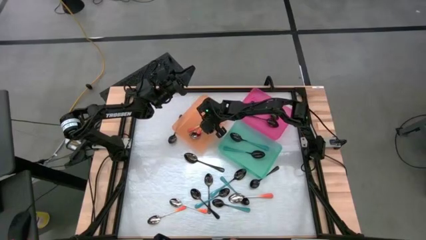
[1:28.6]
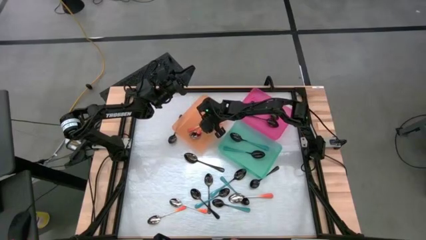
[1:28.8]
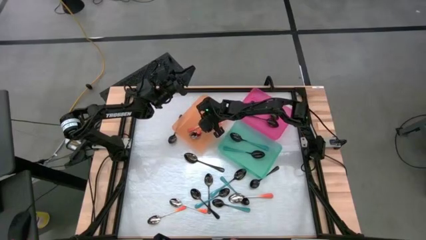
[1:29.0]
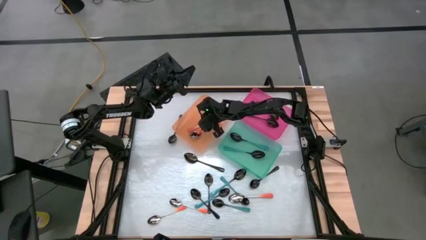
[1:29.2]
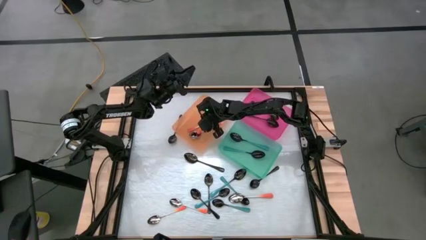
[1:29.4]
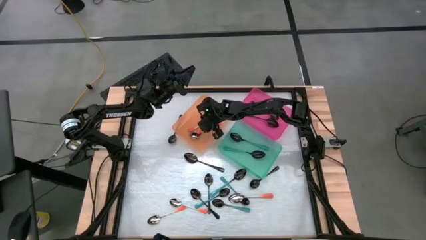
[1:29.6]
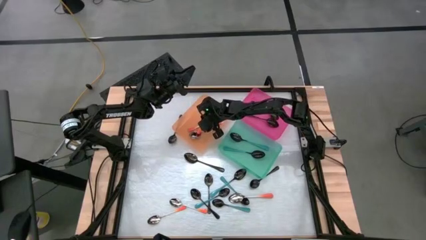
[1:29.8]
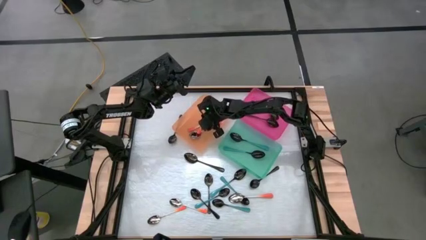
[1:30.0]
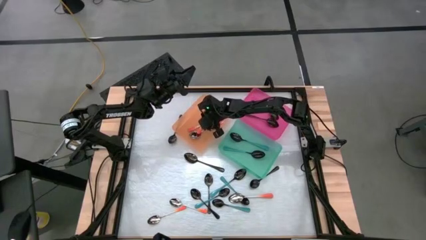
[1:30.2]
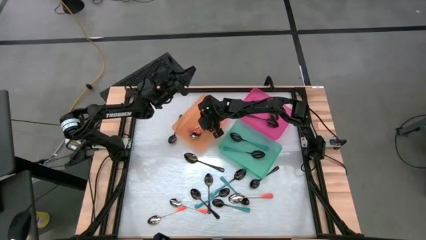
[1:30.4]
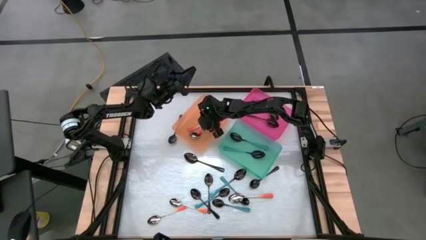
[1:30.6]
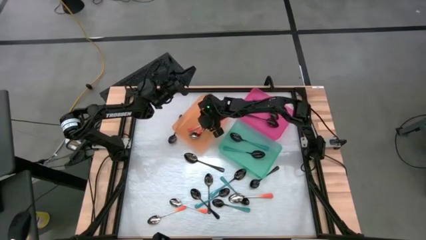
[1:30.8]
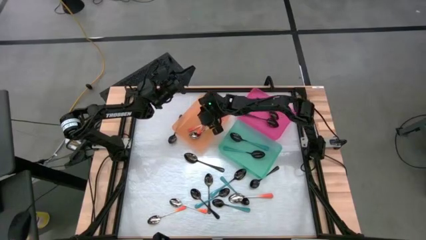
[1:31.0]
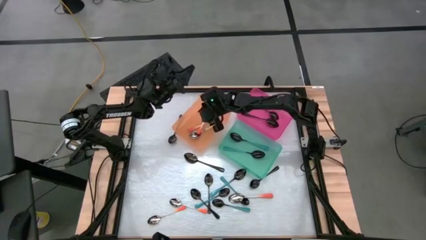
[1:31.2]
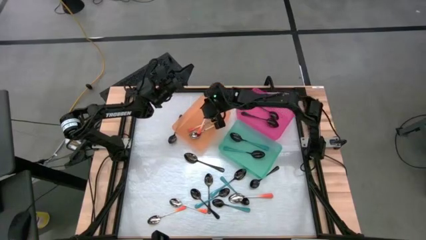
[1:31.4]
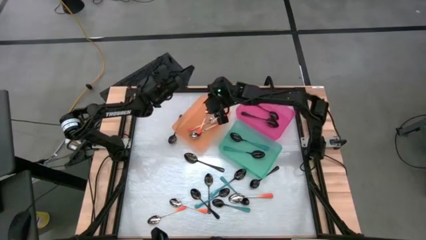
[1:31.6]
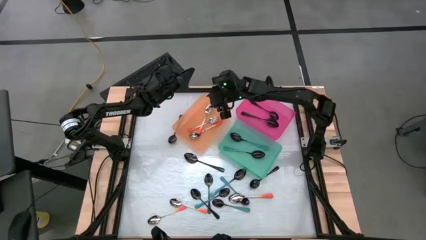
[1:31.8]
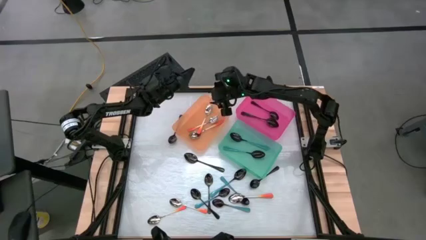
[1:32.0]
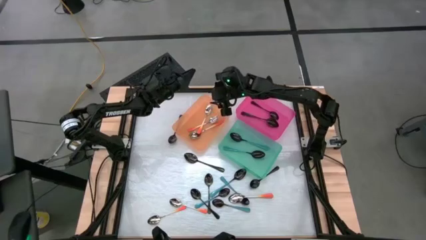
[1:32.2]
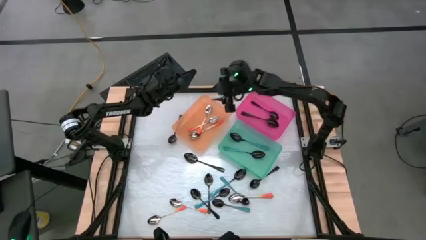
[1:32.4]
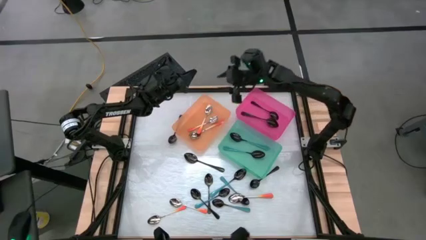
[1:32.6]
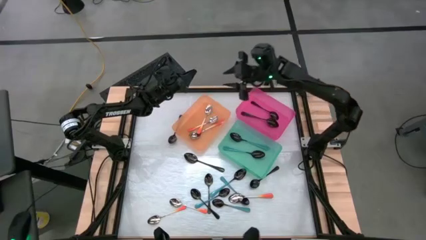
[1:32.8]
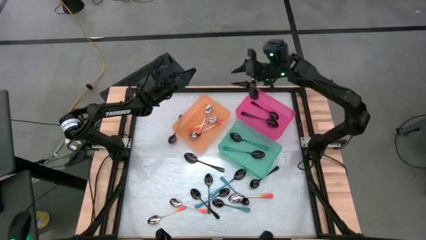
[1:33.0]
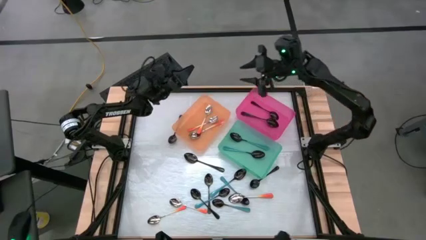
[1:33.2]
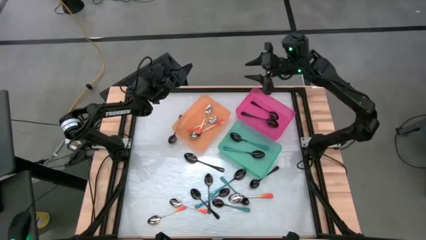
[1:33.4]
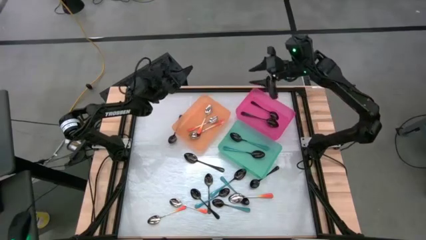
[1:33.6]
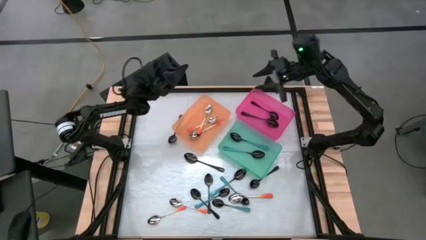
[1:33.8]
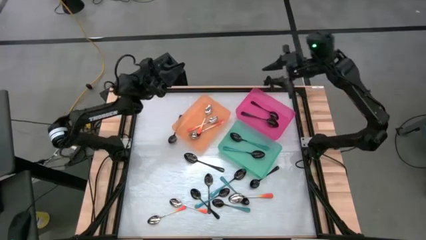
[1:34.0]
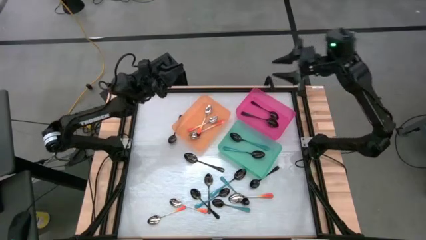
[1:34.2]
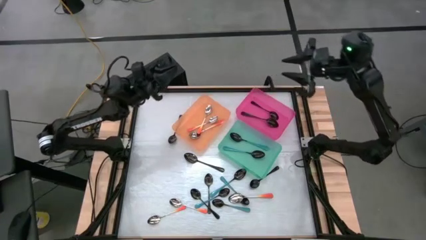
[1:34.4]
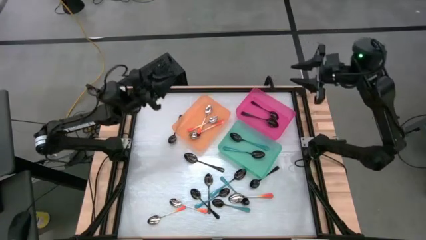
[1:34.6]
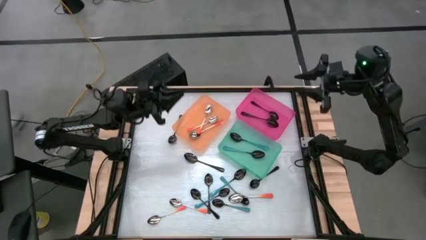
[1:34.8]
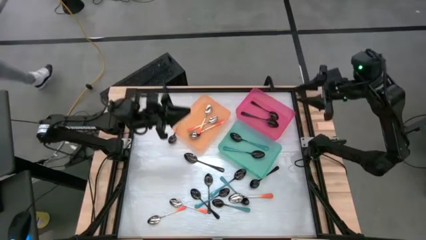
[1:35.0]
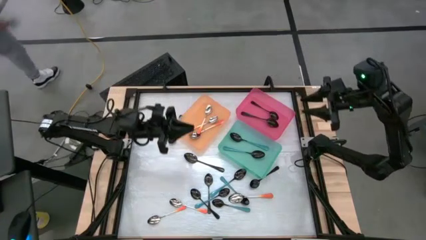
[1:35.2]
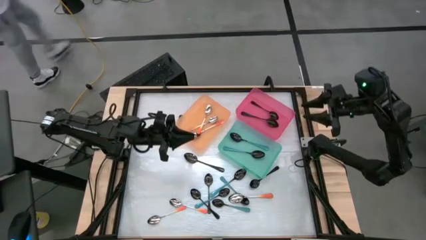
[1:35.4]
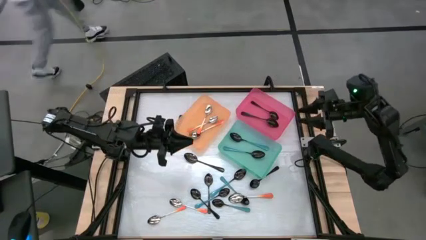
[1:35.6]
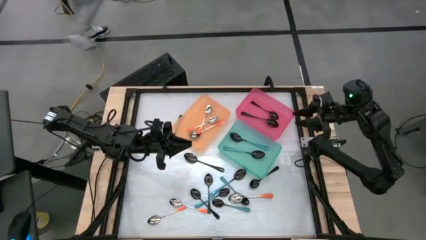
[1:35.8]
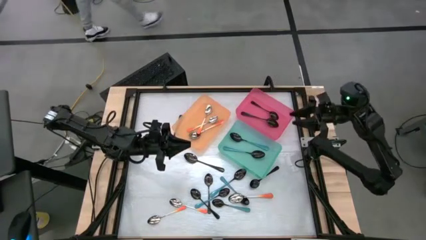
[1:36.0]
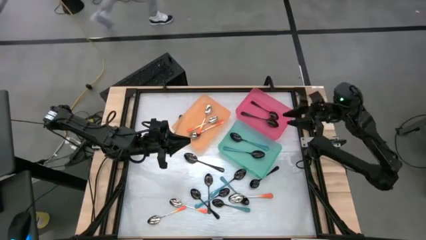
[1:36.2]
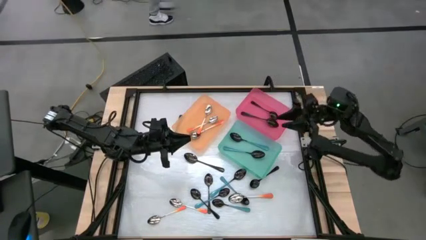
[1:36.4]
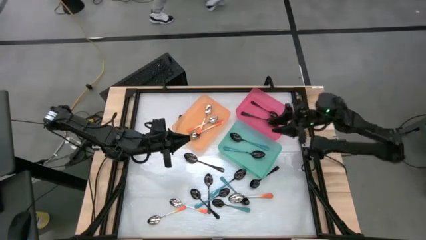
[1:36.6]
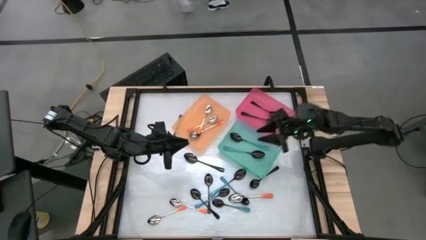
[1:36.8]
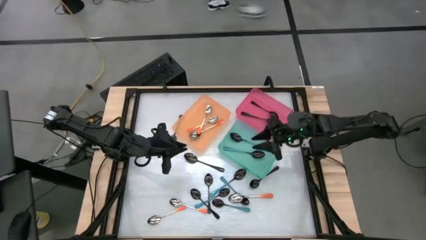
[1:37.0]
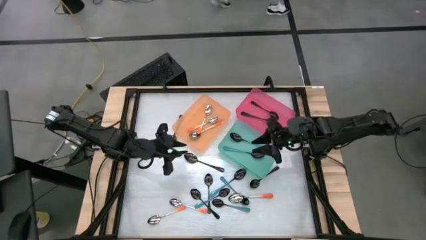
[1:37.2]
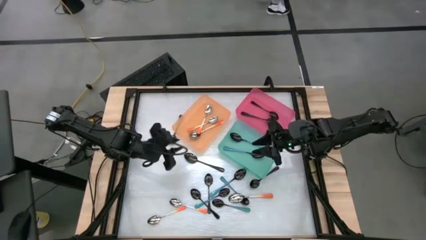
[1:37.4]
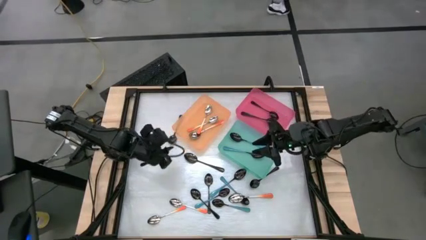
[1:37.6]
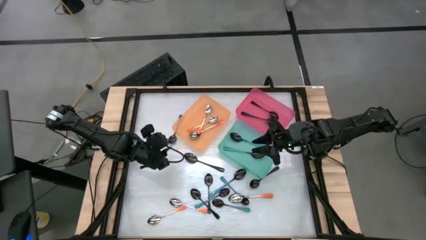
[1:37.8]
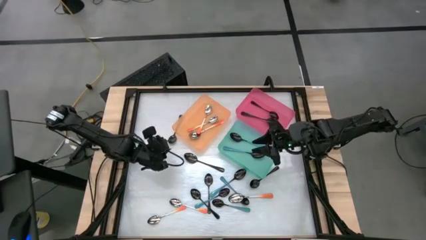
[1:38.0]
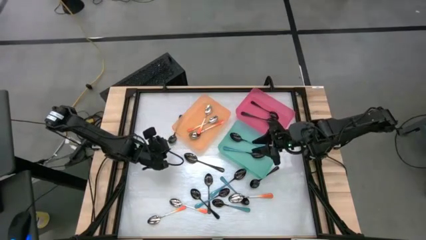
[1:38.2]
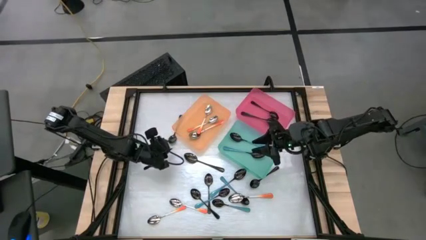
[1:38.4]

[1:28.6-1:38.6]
Task: Sort silverware by color (type)
Put the black spoon into the pink bin
